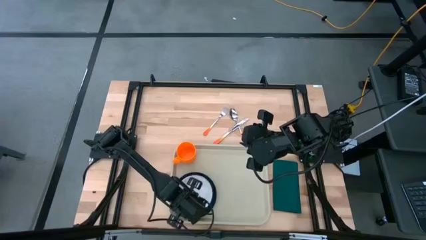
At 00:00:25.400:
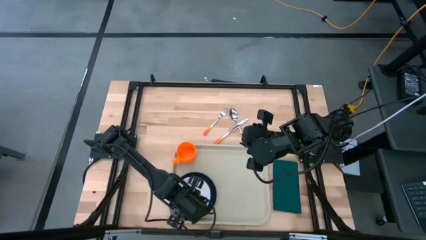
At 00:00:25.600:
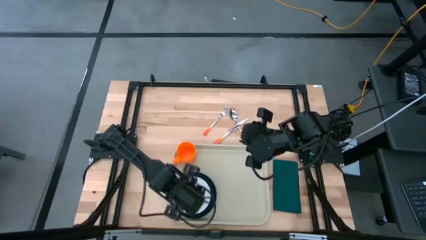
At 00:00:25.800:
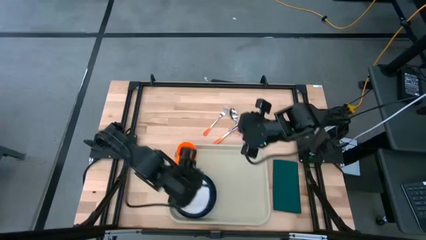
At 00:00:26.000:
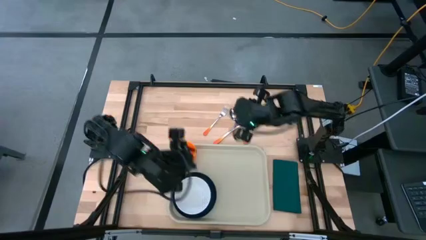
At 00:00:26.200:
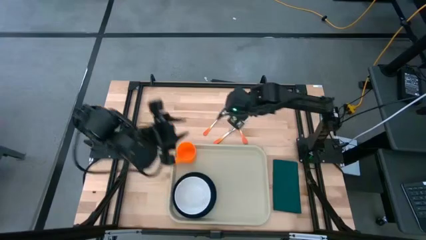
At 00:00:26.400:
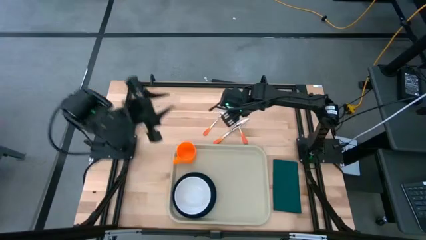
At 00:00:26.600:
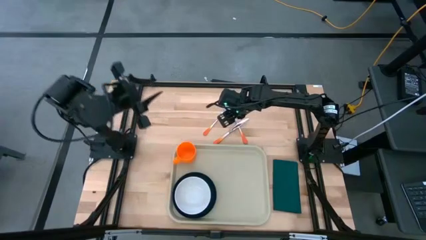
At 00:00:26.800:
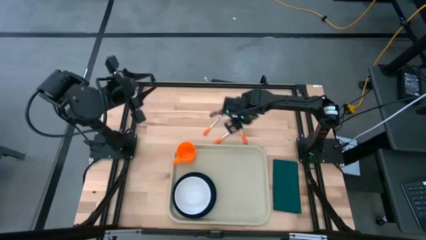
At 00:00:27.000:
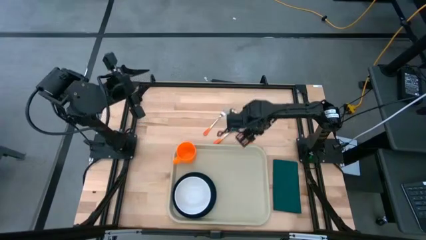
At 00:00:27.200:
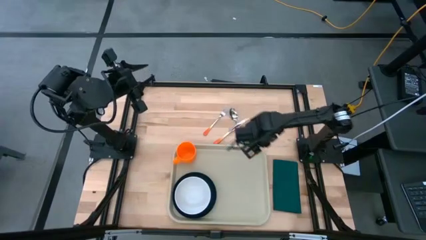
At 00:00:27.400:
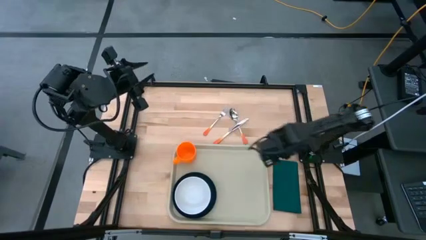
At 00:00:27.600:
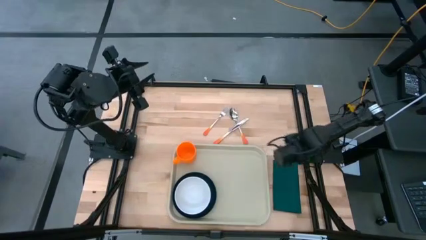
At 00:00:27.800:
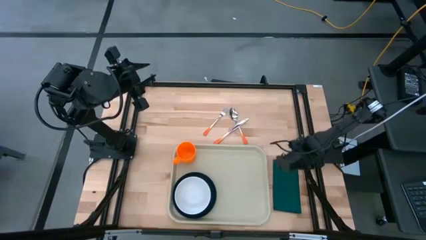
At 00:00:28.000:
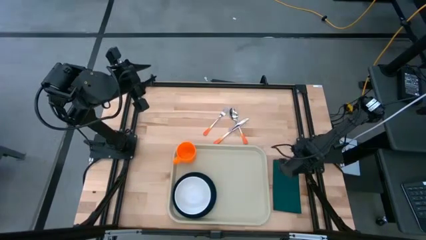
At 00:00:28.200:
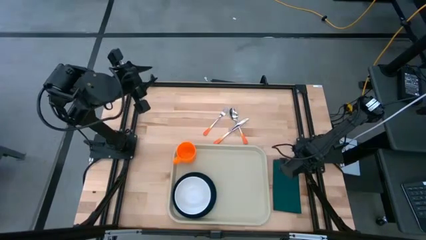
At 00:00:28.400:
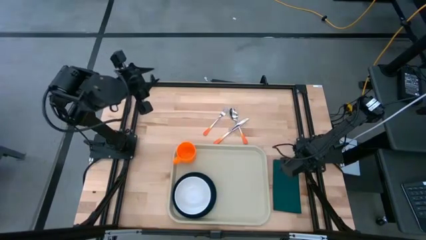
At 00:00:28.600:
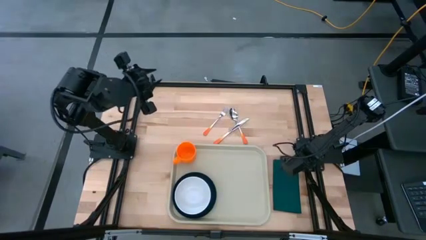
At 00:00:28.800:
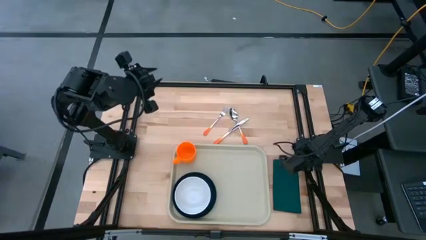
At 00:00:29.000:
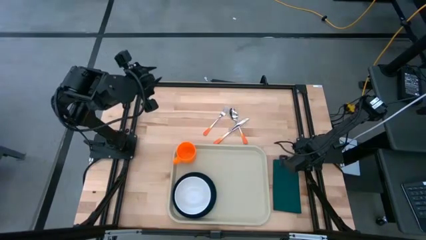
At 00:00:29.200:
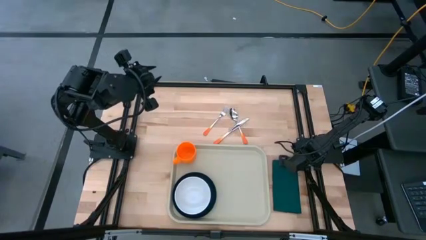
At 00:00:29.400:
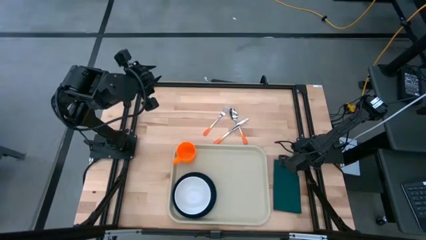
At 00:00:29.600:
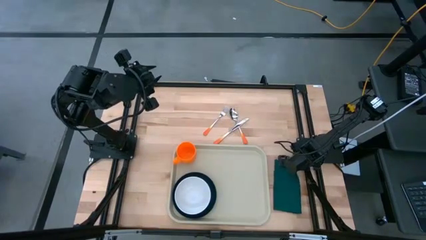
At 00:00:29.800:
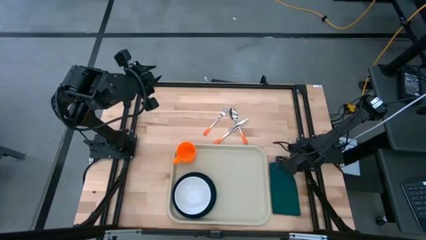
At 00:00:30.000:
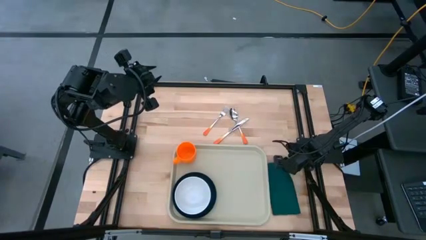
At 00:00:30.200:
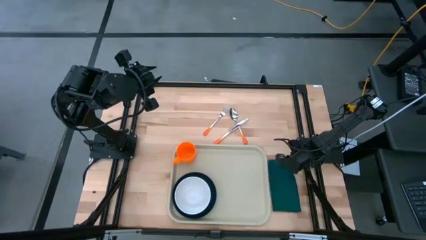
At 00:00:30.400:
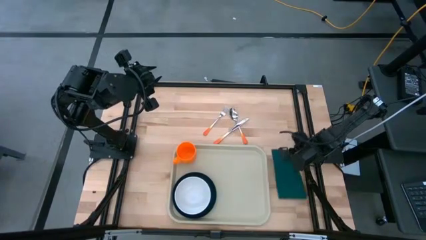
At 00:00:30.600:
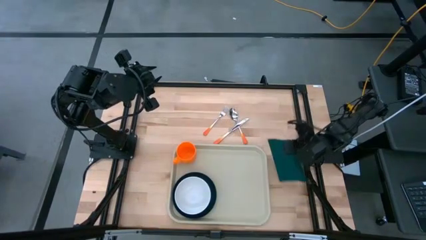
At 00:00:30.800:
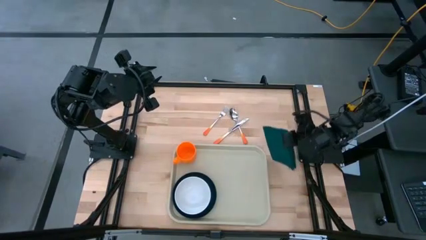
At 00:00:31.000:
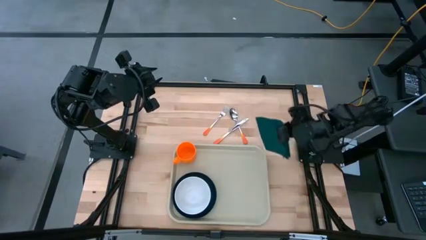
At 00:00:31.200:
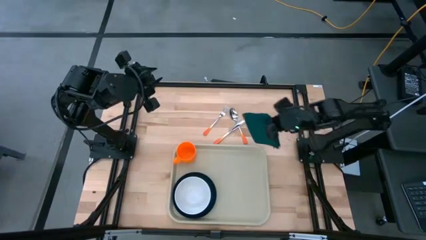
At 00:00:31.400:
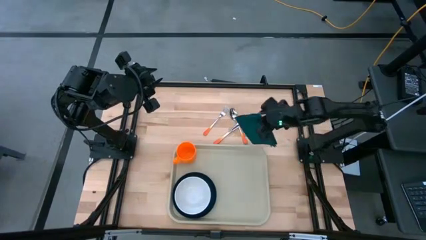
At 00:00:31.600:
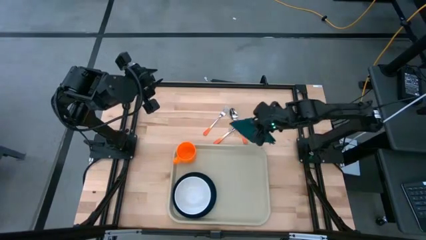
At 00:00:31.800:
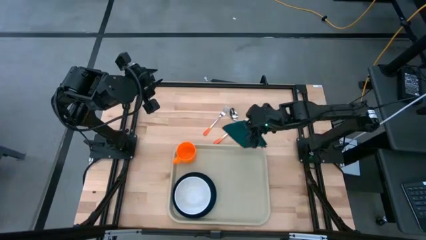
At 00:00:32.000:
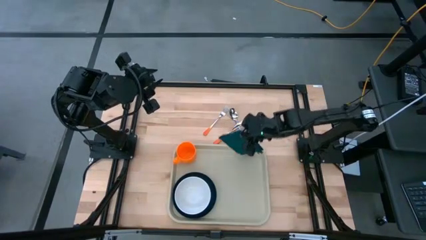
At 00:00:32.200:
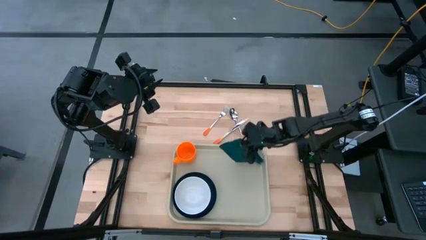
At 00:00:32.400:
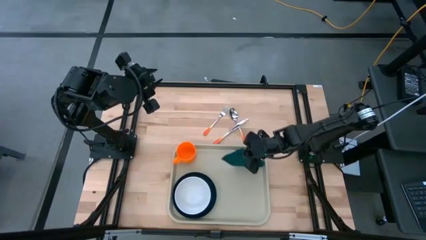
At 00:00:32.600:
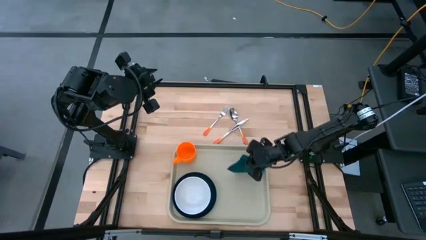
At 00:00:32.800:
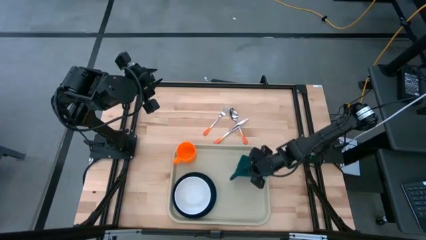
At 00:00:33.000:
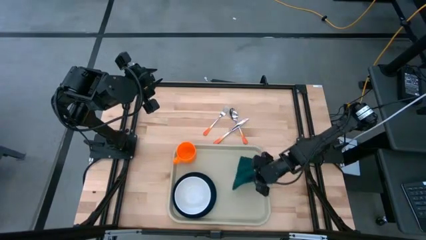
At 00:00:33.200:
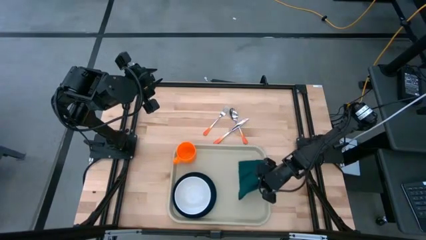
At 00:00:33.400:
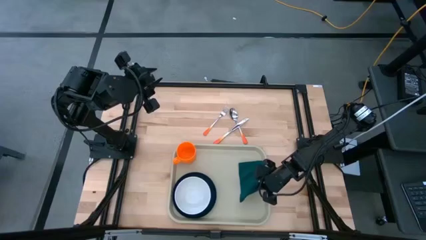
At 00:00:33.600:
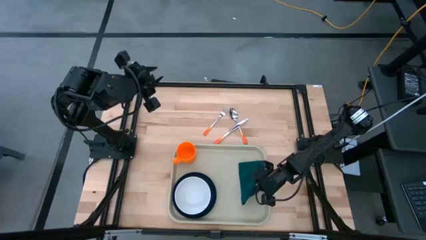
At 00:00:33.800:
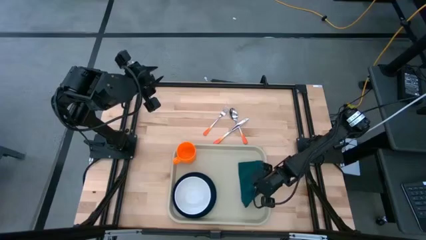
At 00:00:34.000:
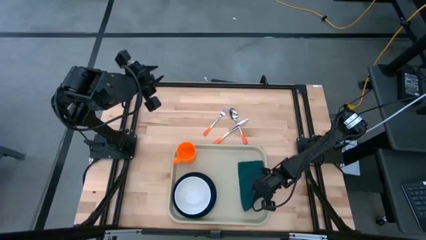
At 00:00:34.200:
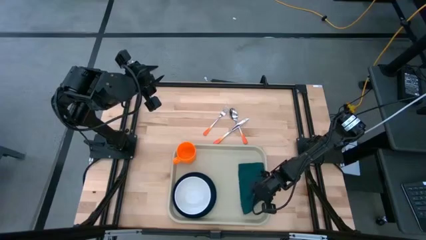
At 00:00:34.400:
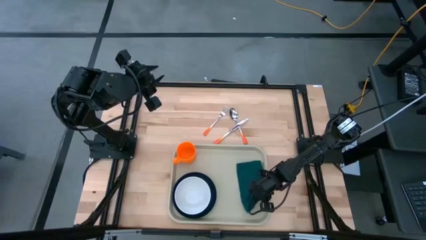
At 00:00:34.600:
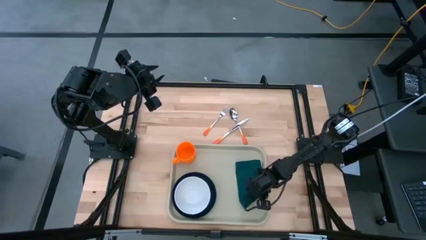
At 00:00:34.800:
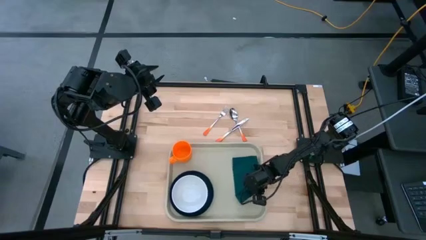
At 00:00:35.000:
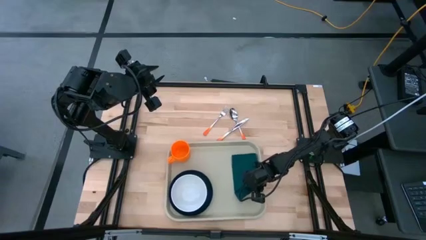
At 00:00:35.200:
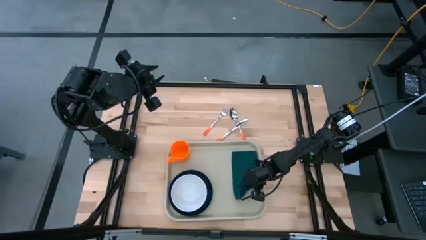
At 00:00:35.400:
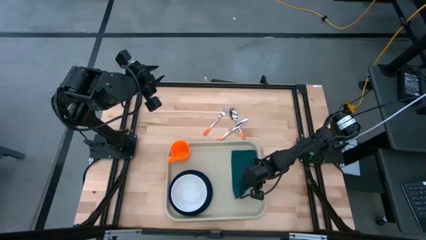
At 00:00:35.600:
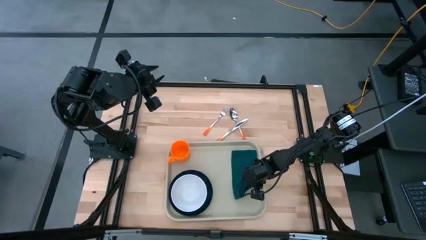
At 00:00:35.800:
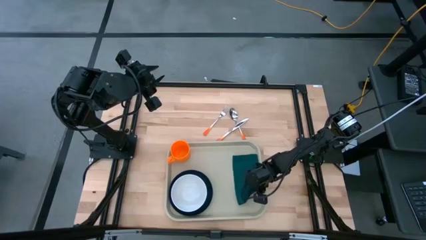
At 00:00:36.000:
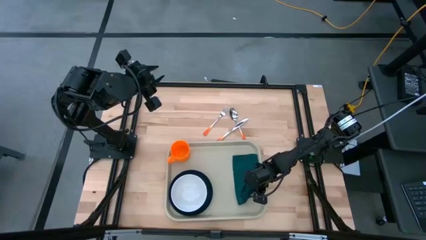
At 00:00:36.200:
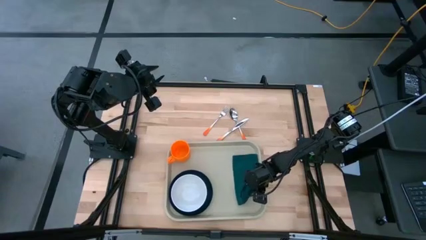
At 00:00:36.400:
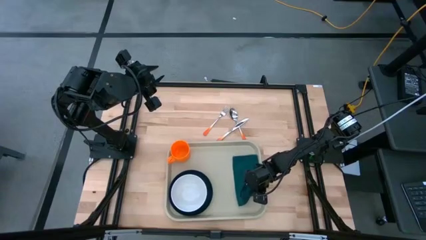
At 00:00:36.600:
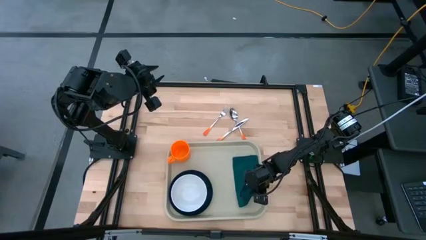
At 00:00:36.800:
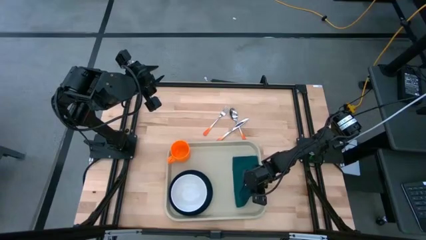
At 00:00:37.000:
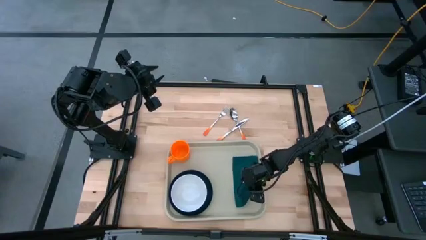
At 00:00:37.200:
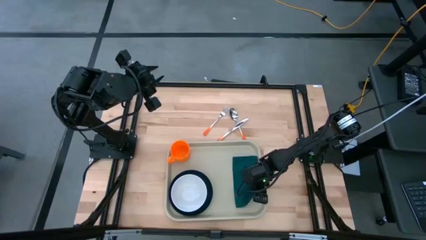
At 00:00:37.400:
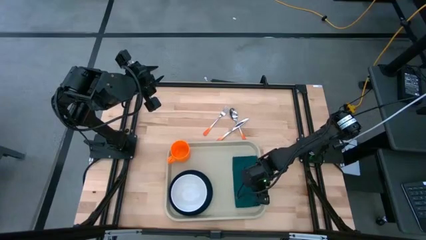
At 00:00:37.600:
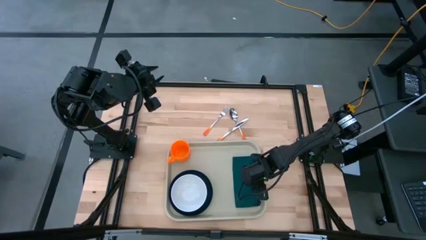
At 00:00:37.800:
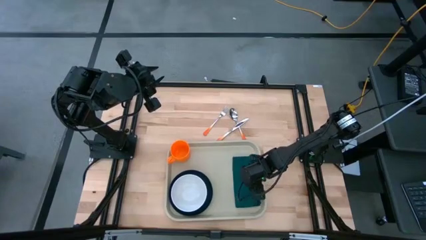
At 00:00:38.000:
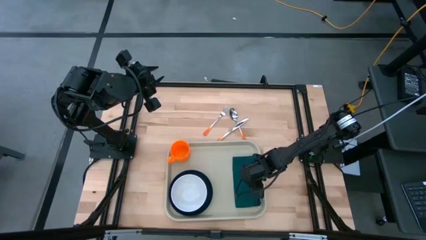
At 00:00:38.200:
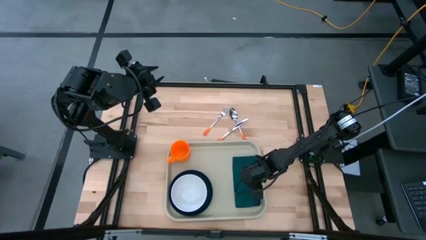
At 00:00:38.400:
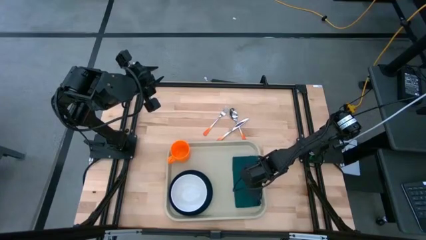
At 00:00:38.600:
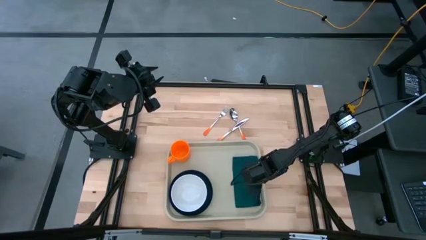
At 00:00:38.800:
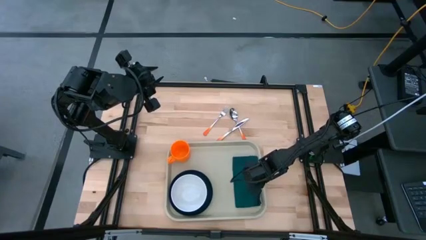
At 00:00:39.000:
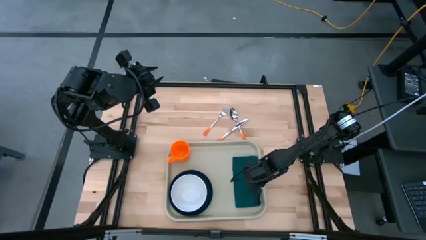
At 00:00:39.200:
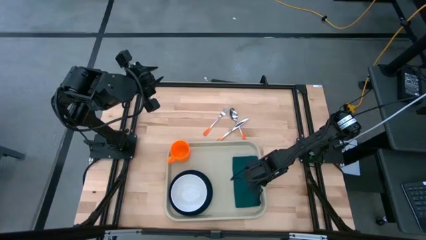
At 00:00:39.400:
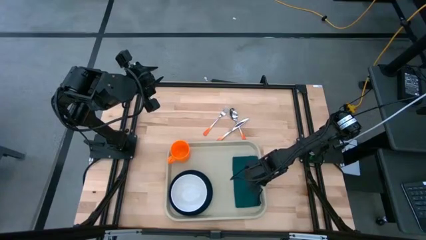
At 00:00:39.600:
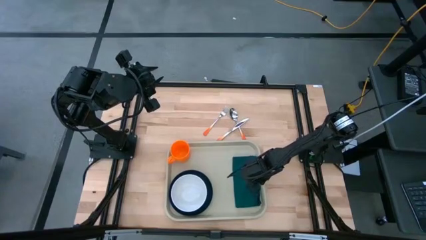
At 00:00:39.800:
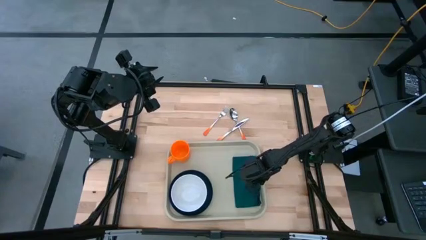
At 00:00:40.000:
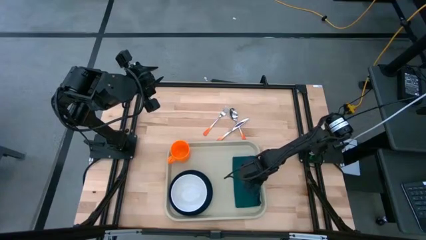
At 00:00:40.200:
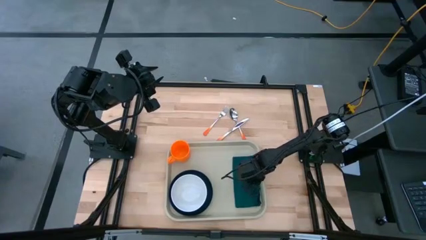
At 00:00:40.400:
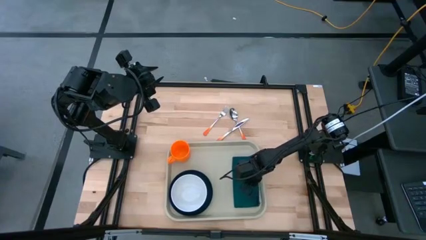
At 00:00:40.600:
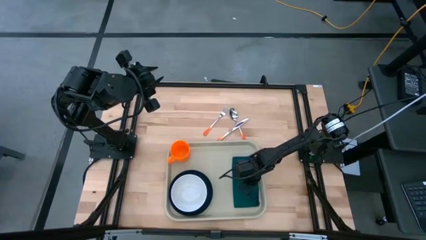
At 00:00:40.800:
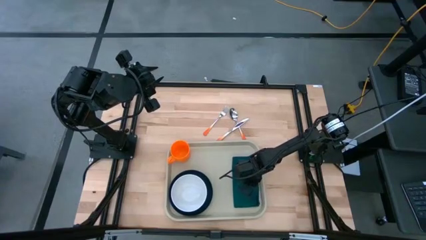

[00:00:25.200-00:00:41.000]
Task: Set up tray
Put the green napkin on the brown serving tray to the right of the black plate
